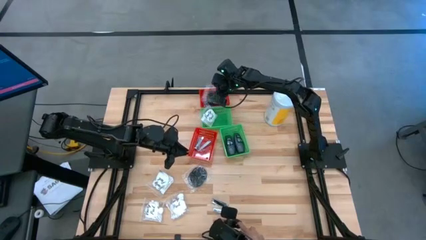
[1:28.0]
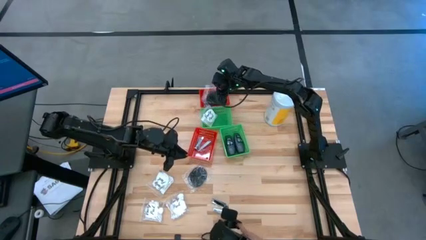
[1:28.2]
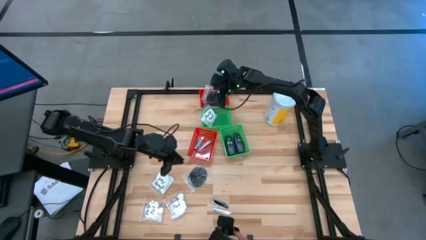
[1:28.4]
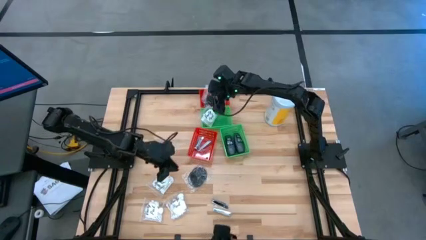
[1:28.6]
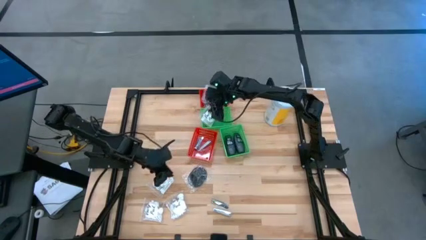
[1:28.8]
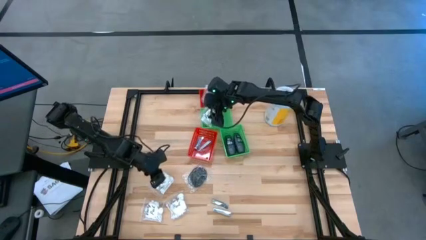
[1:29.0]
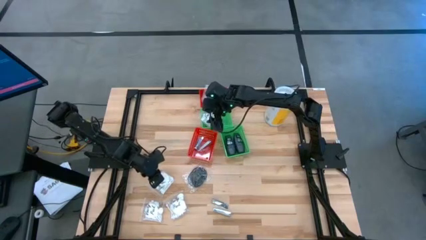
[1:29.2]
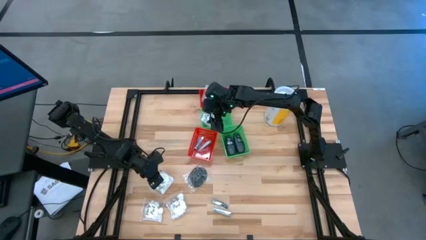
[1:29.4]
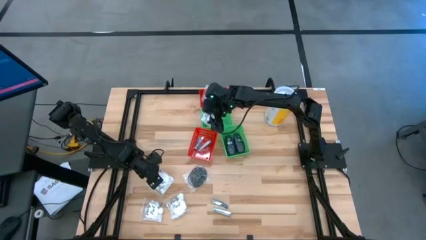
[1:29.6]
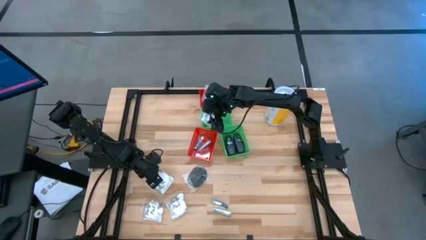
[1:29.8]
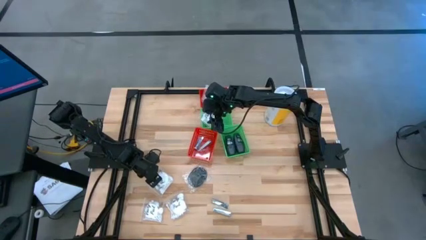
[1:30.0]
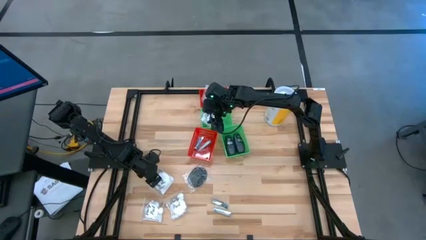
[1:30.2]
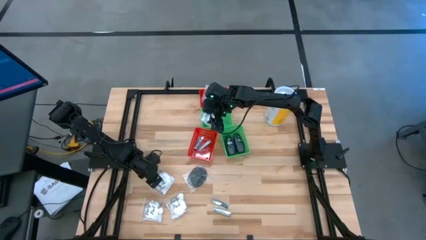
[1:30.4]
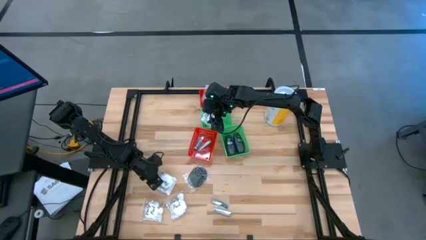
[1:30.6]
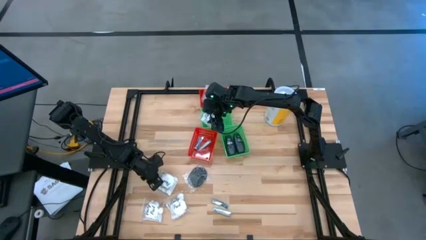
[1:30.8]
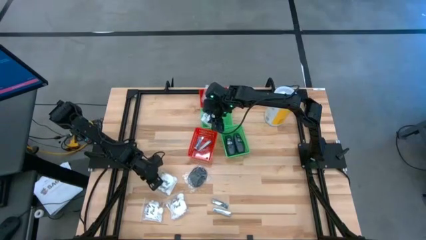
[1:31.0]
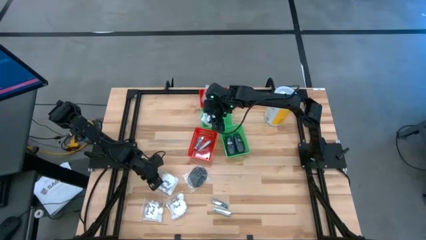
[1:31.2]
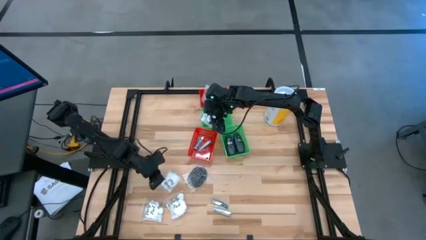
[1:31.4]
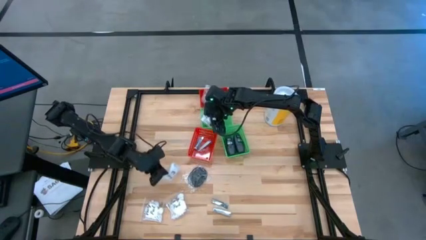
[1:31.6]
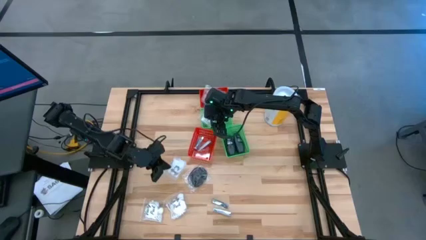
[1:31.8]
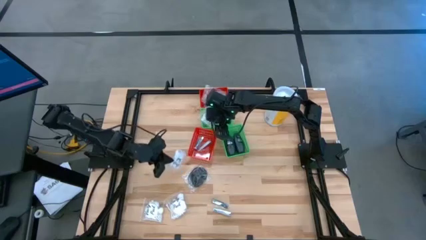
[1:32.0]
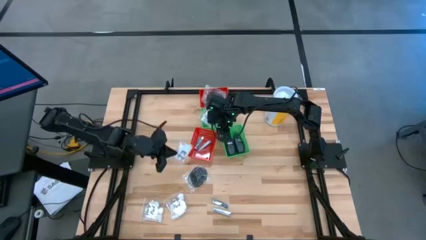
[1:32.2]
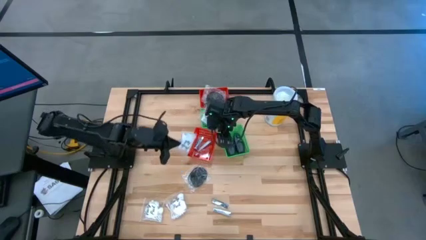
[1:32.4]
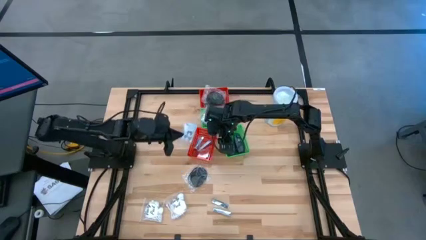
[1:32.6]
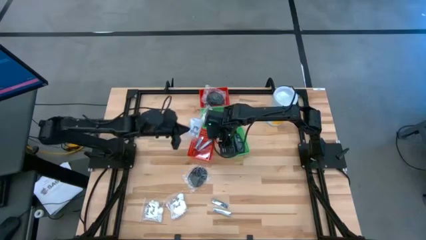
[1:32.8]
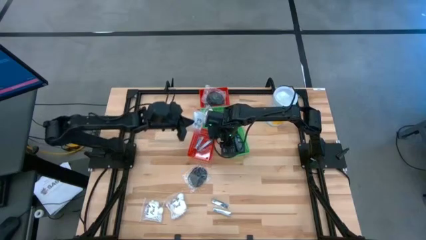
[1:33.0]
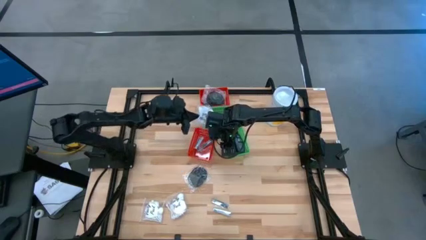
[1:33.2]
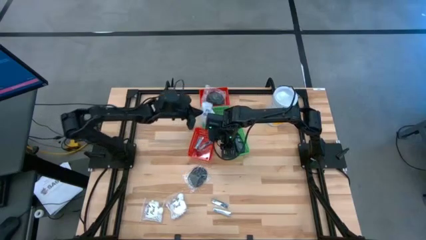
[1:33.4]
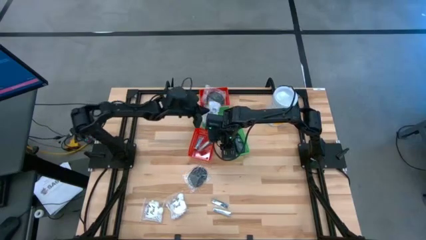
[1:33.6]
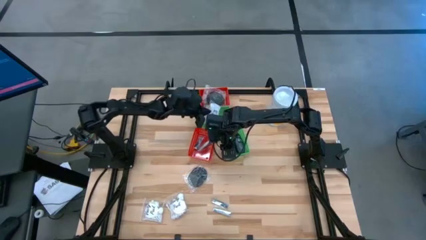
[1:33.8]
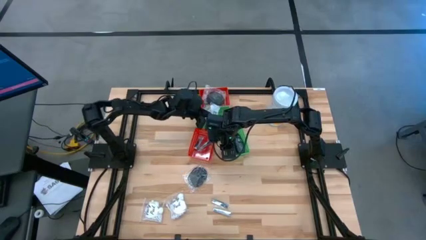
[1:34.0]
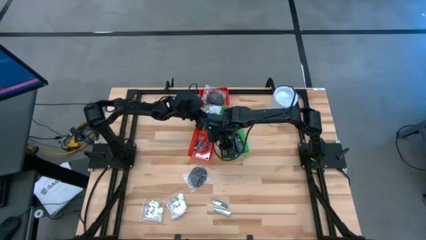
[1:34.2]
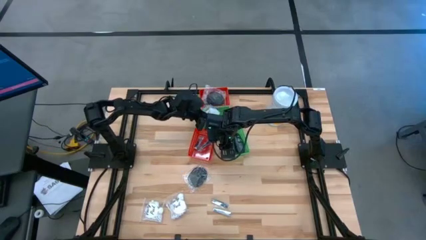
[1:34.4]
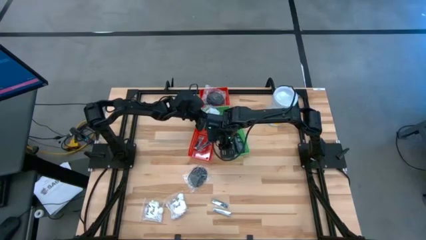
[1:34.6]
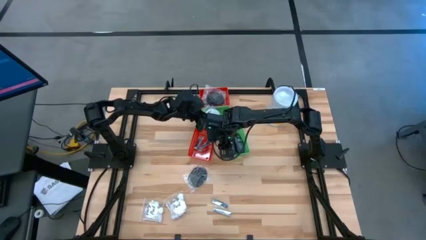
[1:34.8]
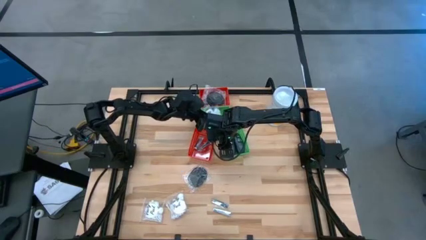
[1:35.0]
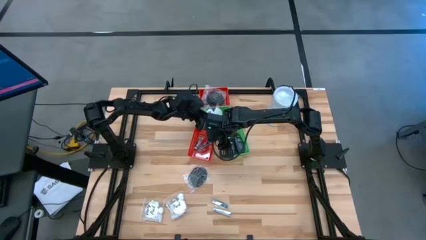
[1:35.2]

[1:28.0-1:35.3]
Task: Pick & Place Travel size toiletries
Put the white cotton pack into the top green bin

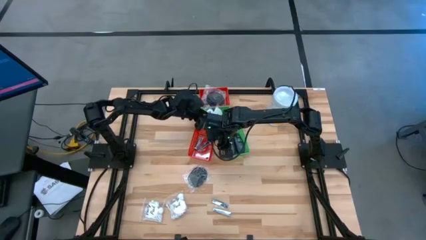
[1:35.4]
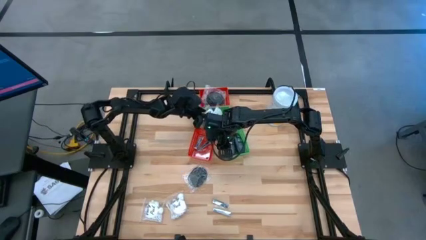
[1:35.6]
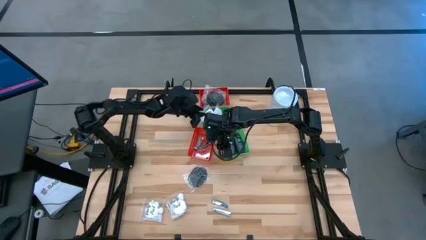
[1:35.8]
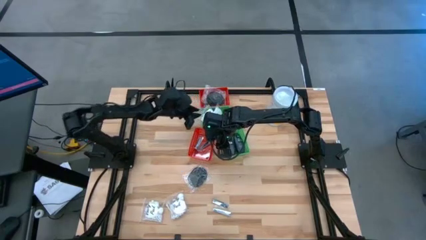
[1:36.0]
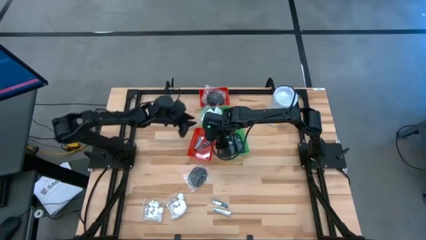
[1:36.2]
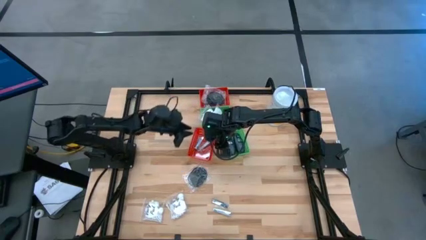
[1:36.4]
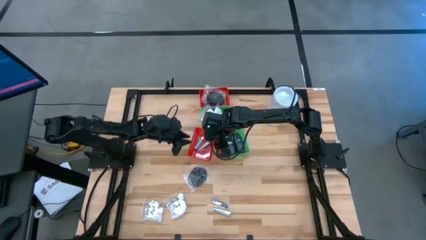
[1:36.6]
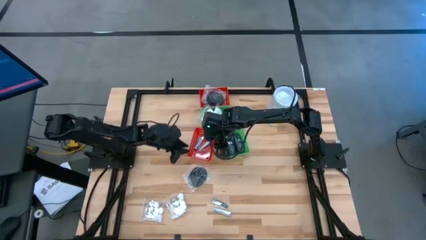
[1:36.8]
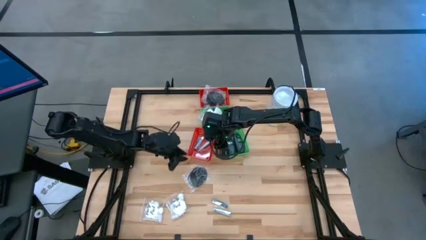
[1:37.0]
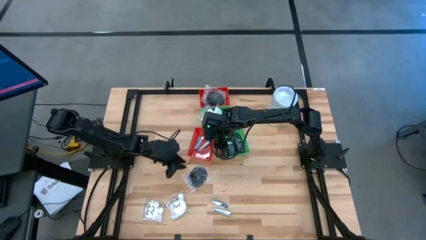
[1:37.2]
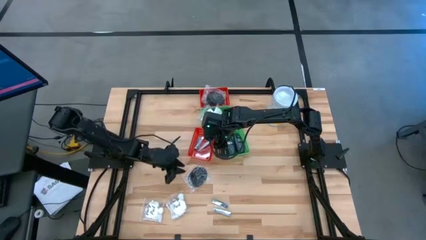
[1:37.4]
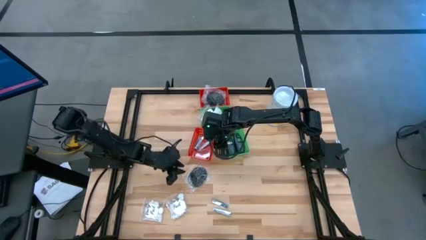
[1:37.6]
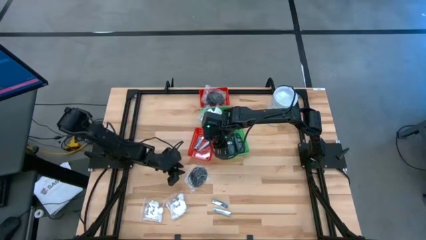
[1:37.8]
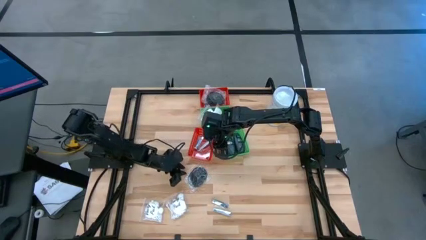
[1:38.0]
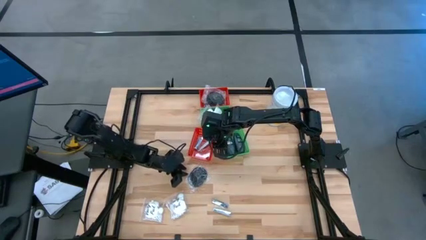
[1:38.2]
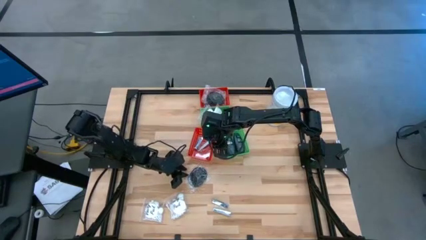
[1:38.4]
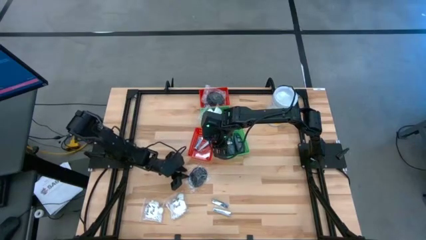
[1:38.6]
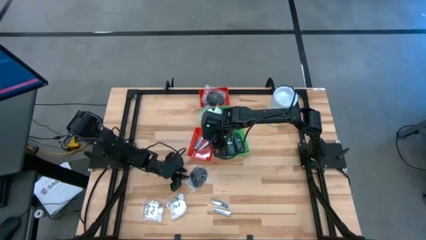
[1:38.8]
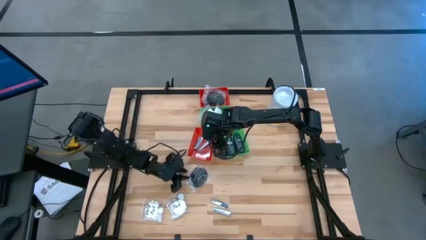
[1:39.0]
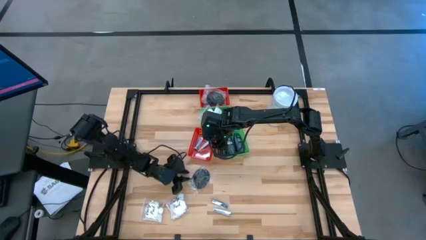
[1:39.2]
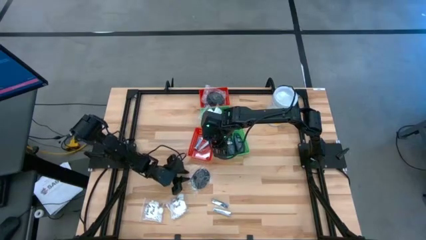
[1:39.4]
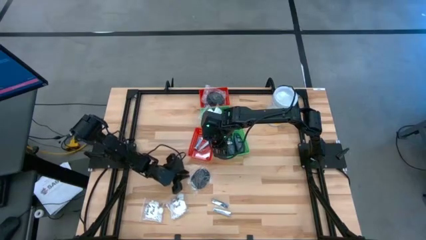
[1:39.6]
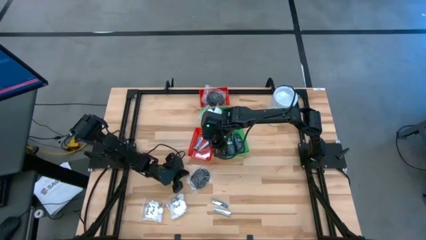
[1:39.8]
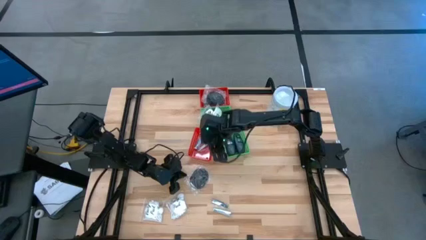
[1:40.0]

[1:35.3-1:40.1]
Put the black hairbrush into the top red bin
